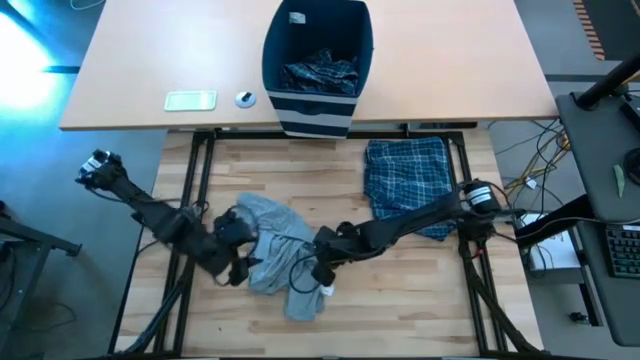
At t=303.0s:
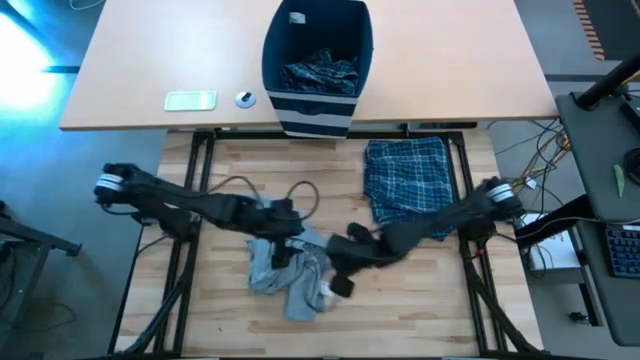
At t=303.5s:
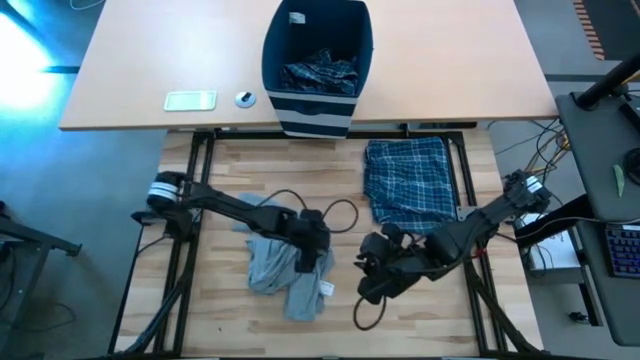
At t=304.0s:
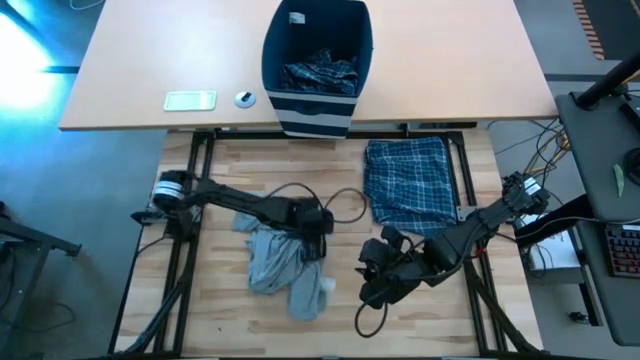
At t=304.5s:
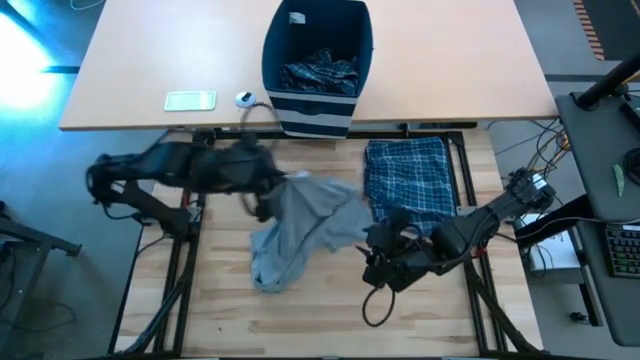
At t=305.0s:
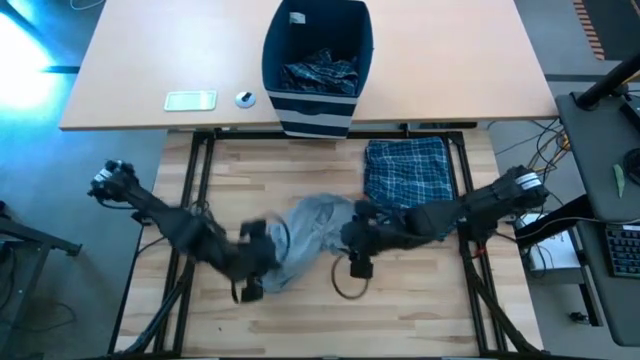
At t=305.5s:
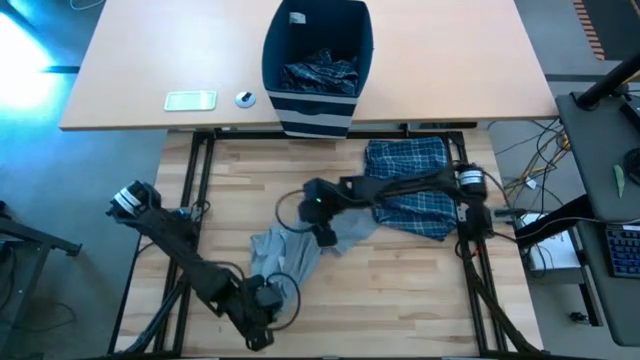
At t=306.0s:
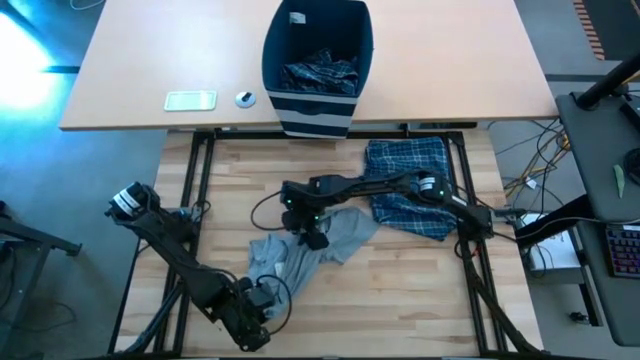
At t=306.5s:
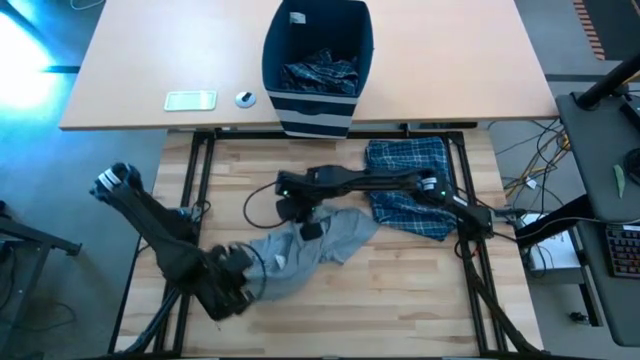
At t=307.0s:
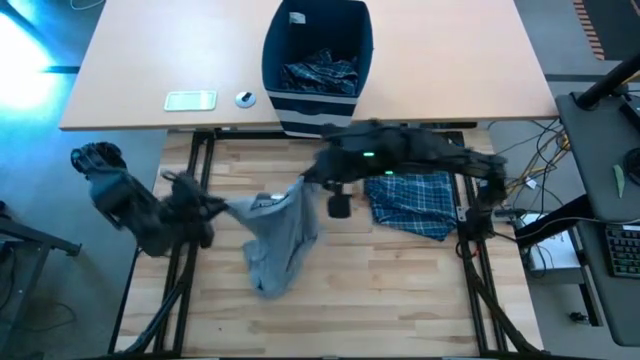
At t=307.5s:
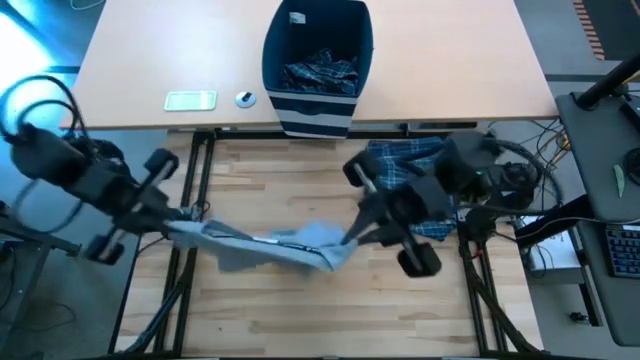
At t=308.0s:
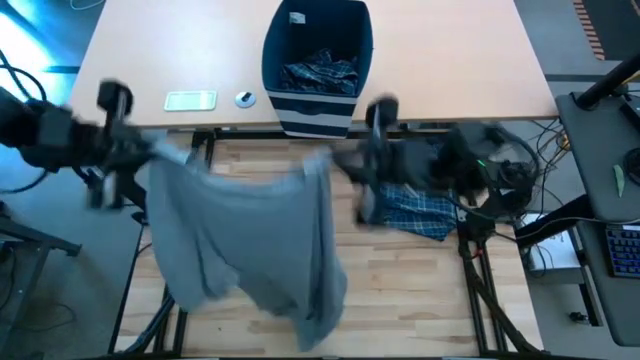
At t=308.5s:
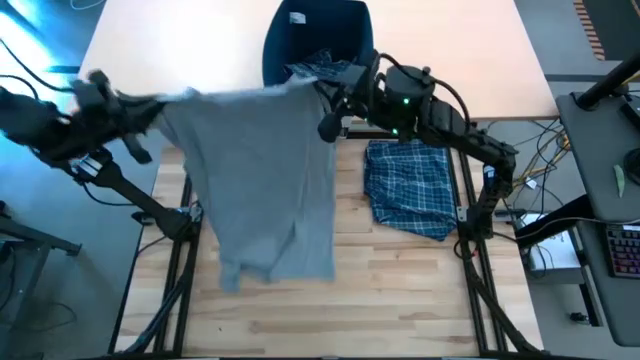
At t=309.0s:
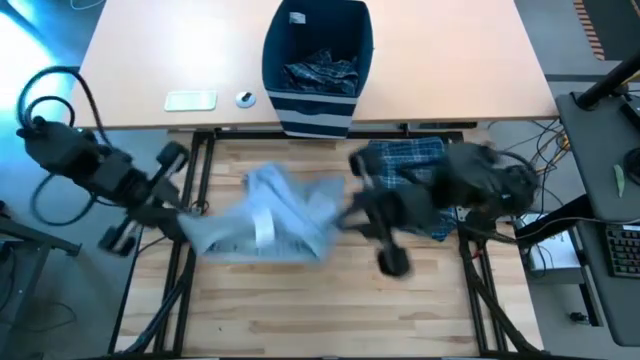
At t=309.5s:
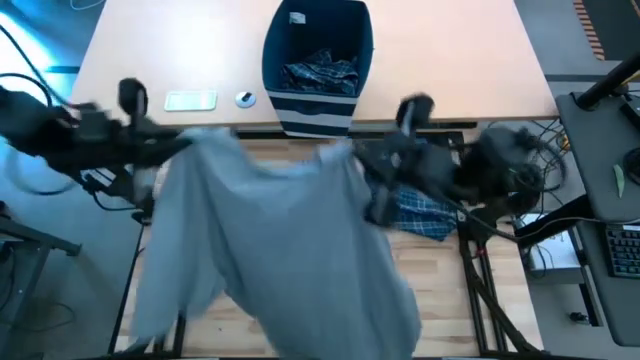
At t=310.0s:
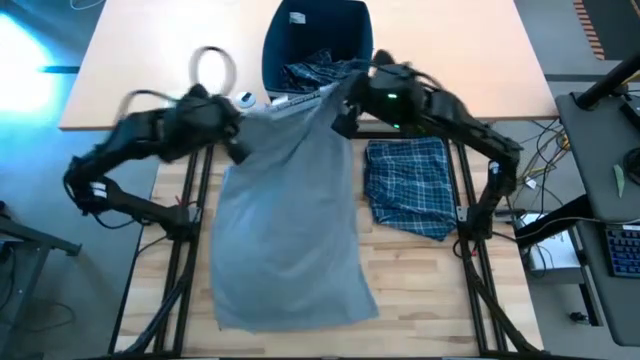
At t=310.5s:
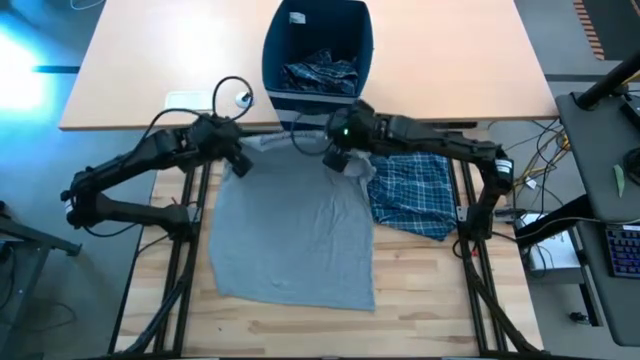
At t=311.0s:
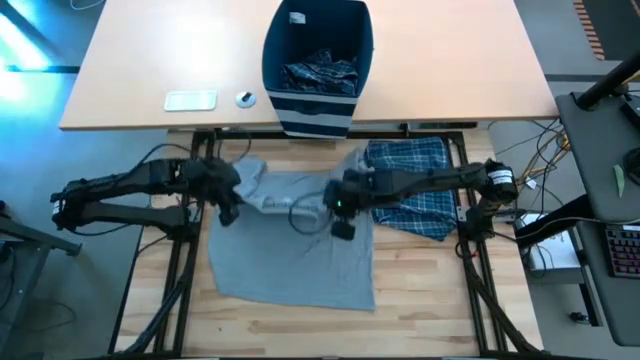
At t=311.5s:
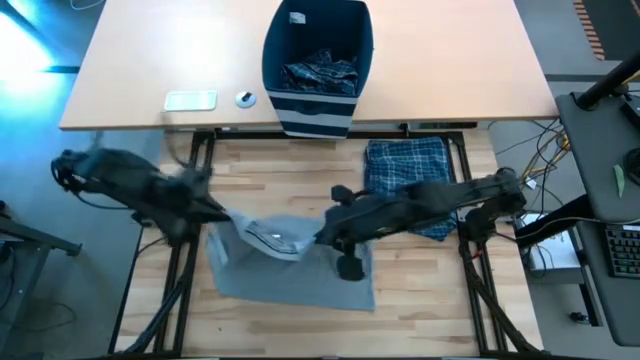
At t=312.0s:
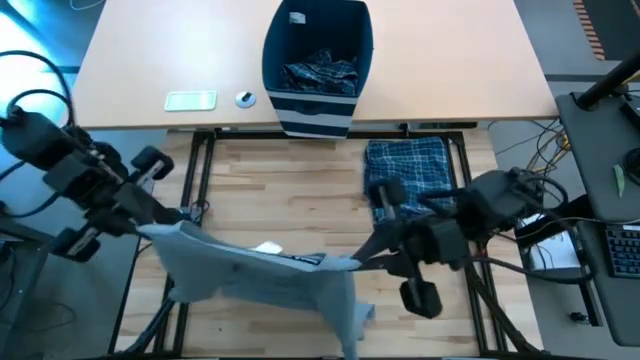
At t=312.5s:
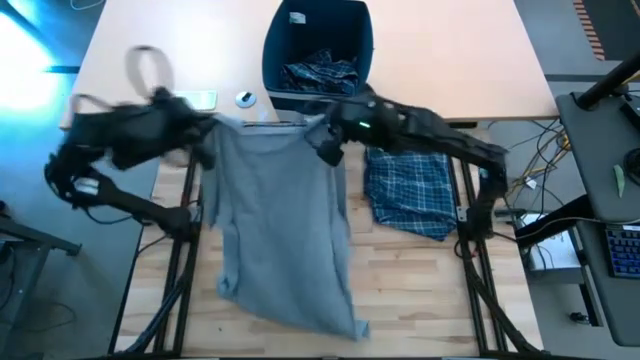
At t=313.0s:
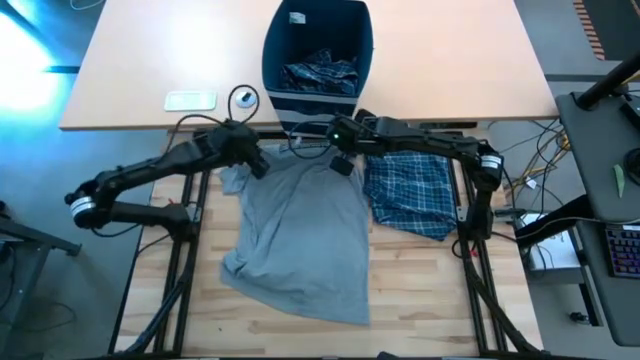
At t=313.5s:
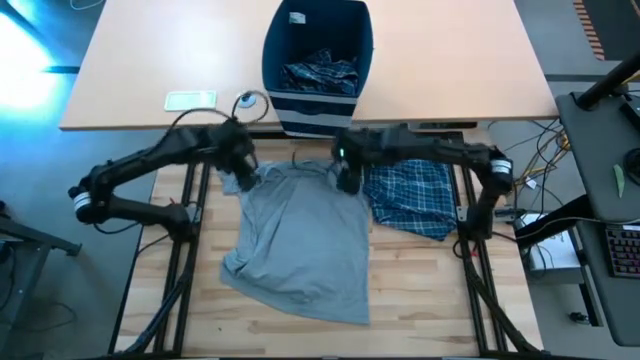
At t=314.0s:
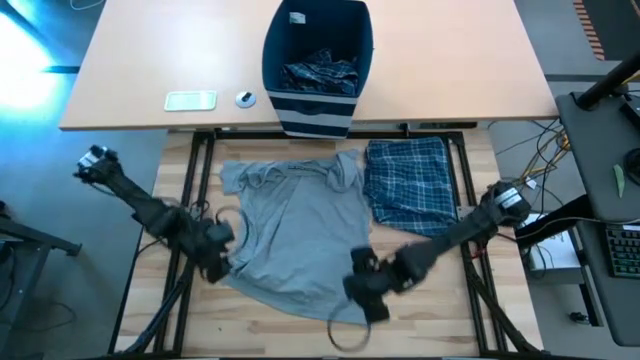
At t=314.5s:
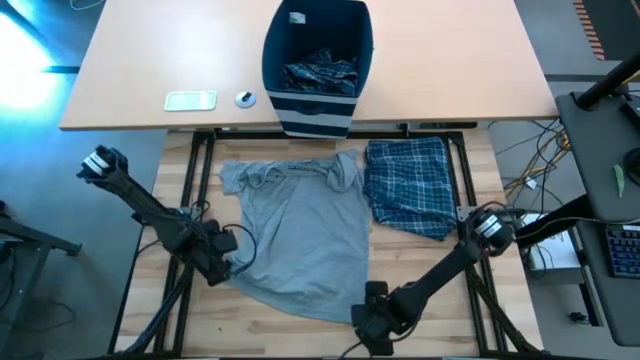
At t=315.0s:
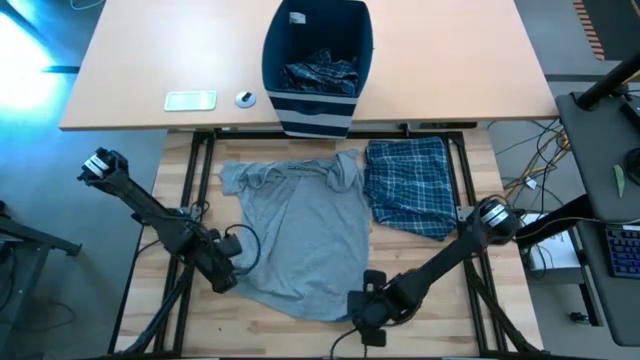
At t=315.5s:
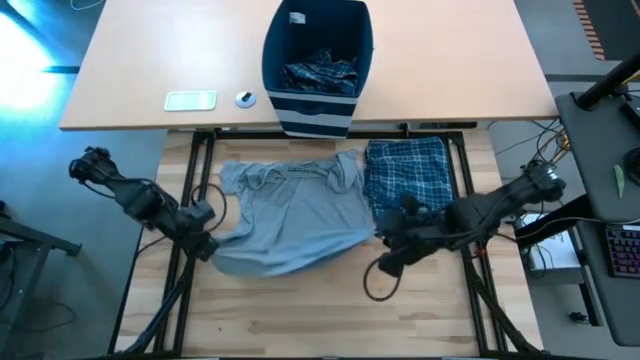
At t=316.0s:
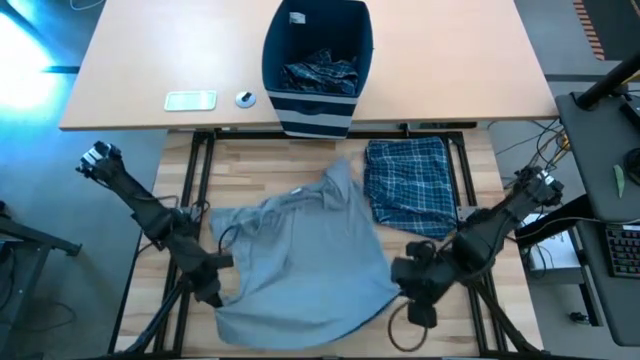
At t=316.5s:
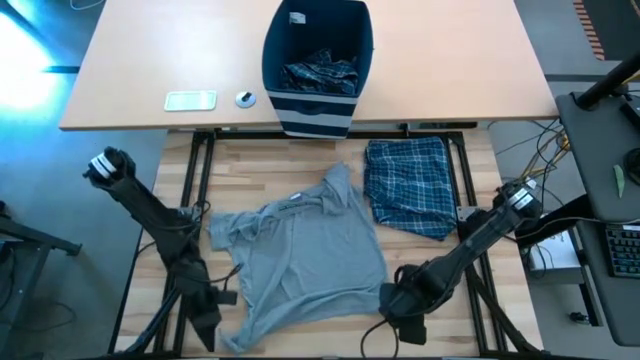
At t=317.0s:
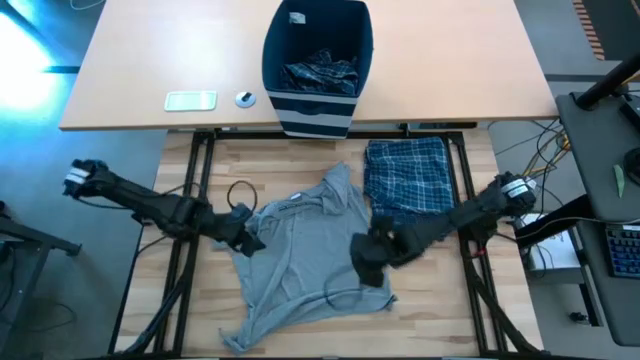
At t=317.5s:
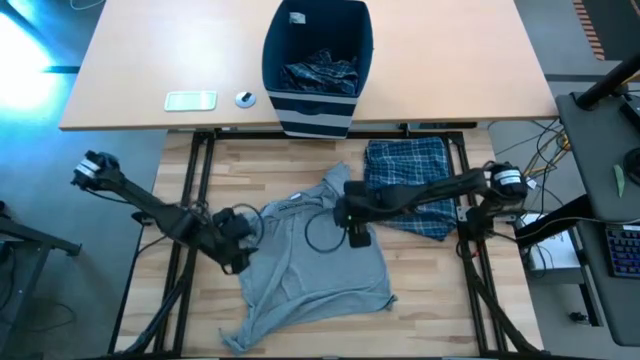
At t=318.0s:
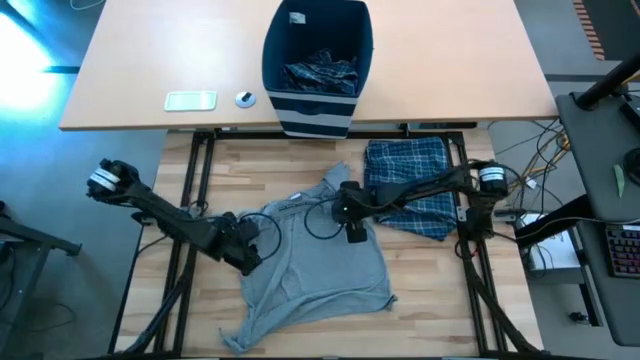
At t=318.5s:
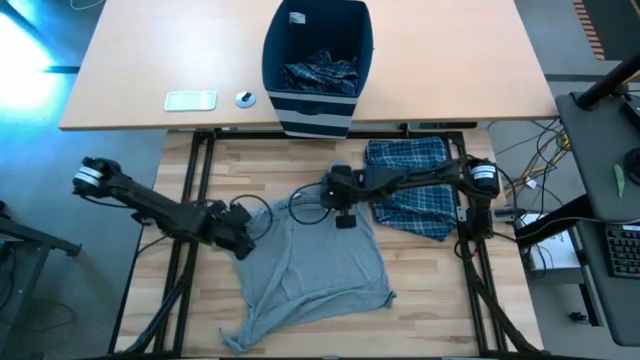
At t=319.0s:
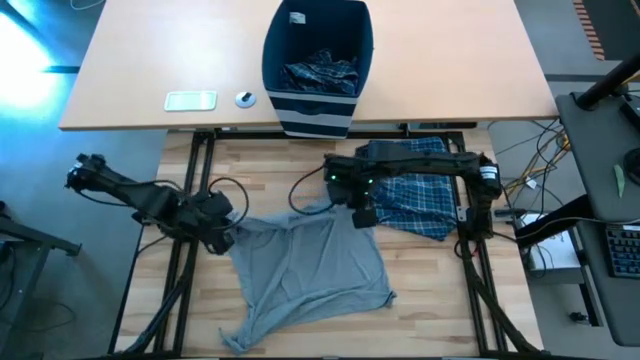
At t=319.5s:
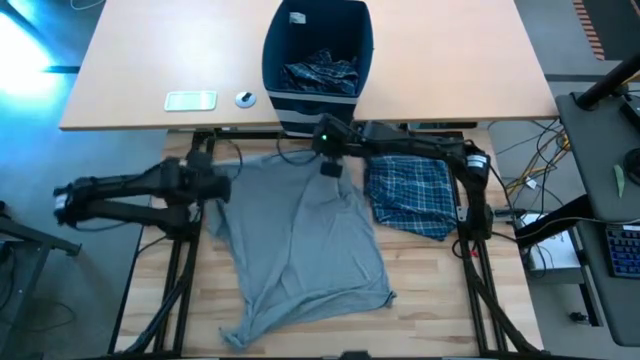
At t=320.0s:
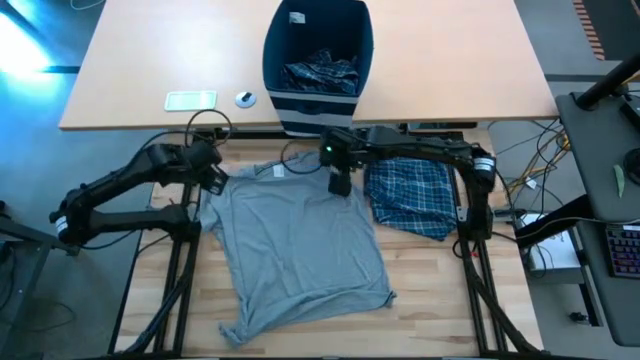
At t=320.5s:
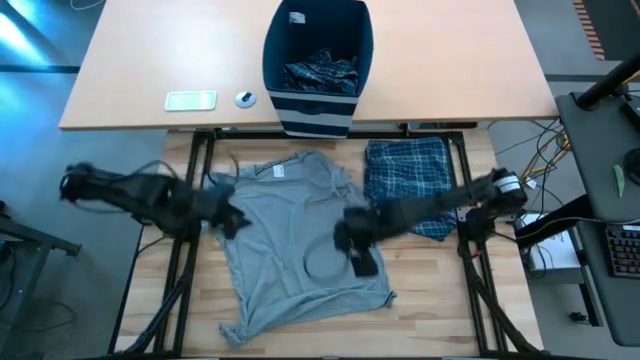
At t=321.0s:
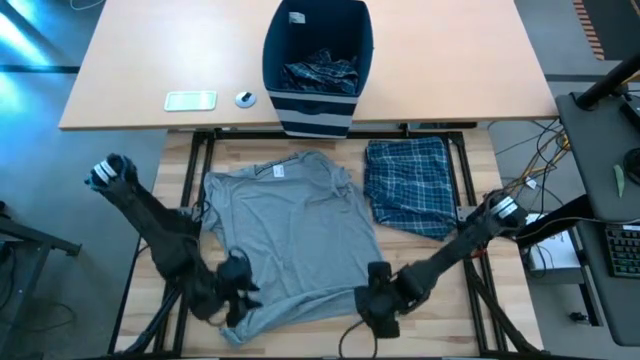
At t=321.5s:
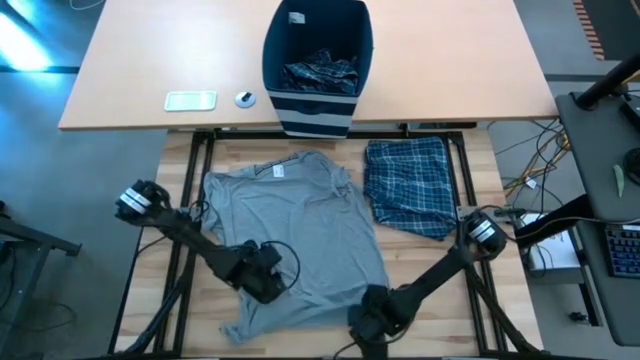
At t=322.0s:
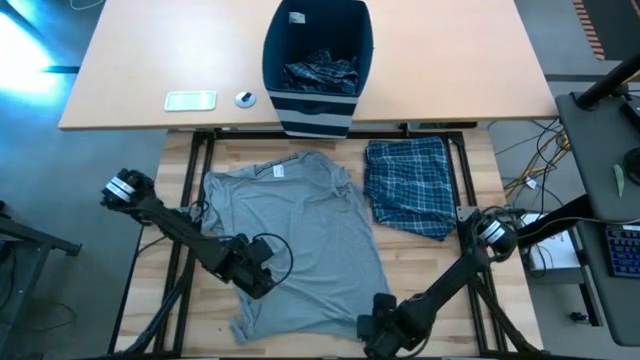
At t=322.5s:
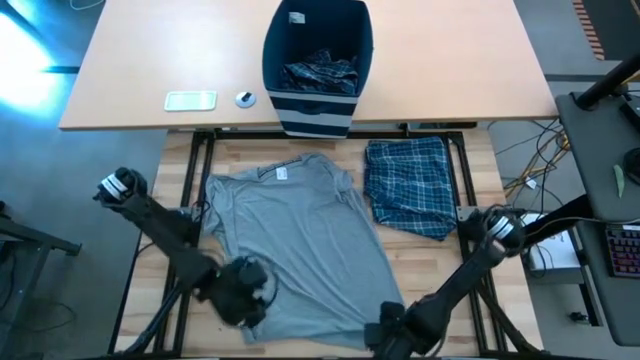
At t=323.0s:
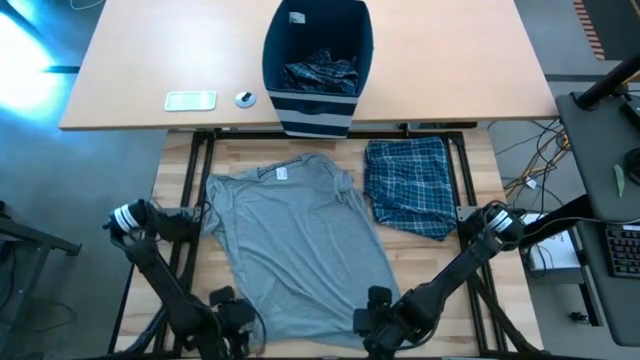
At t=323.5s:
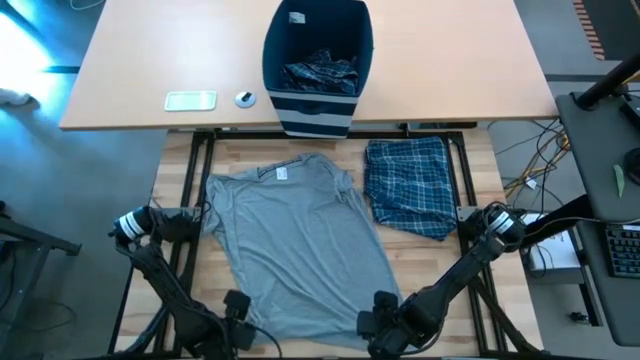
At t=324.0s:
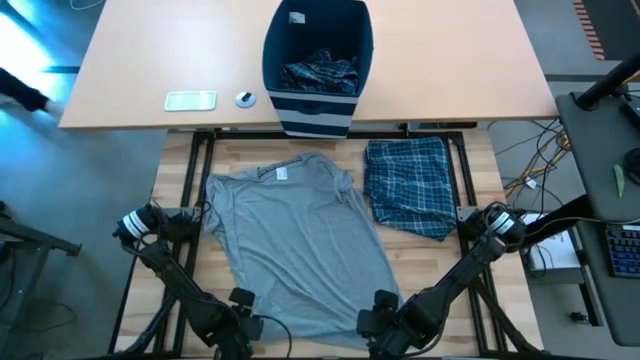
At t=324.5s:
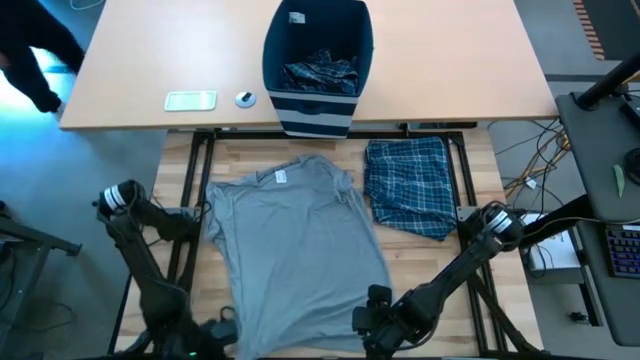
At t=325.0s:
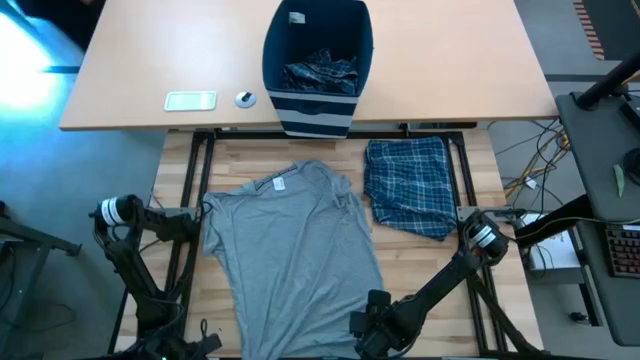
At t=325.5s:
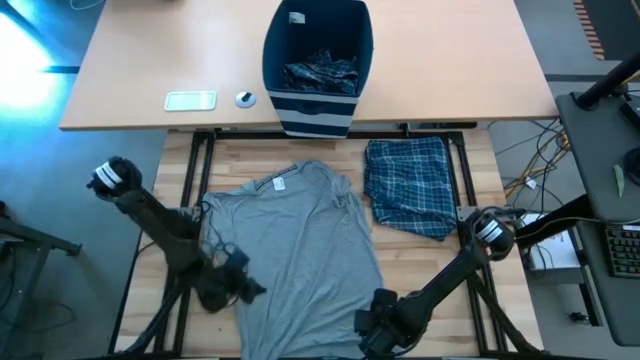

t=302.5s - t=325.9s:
Task: Fold Laundry from Bin
Fold the gray shirt
